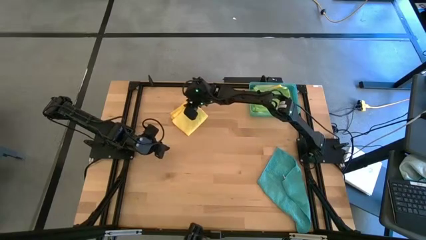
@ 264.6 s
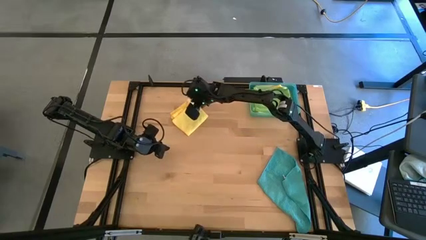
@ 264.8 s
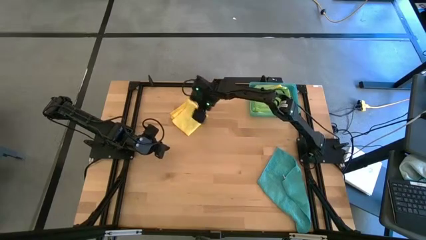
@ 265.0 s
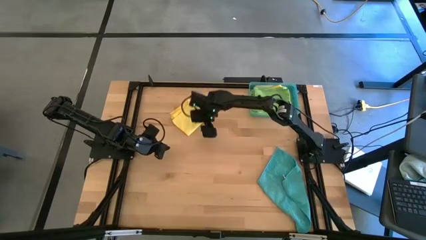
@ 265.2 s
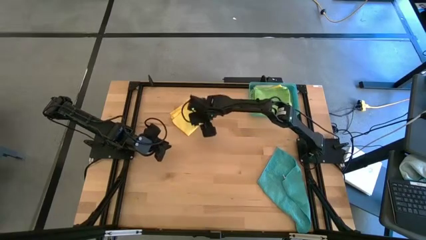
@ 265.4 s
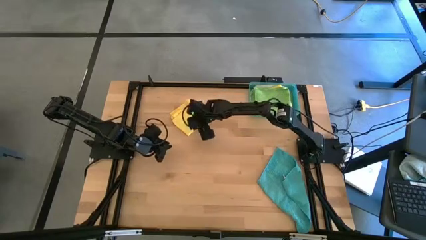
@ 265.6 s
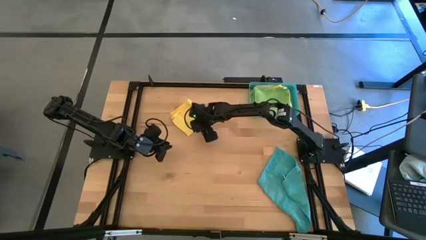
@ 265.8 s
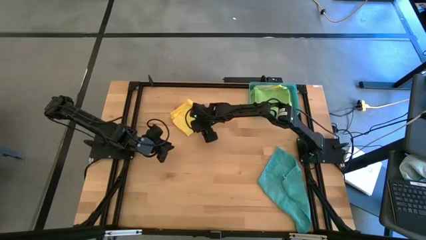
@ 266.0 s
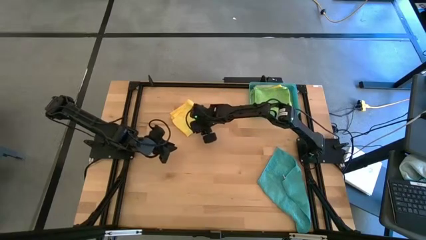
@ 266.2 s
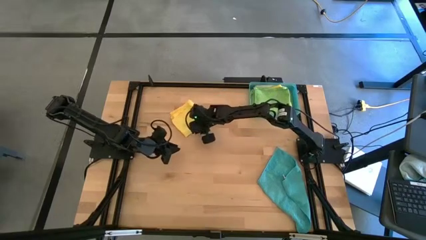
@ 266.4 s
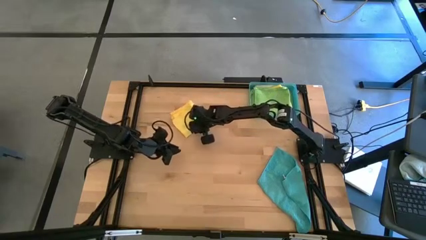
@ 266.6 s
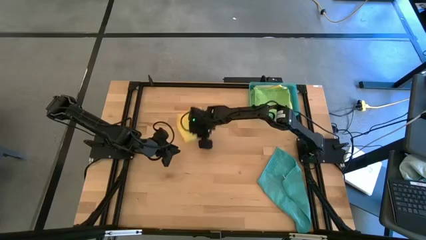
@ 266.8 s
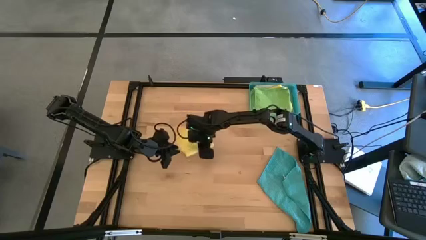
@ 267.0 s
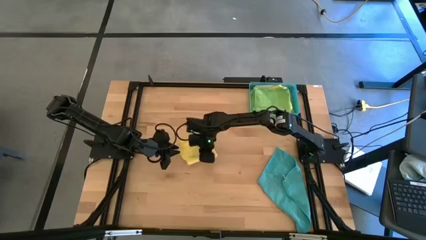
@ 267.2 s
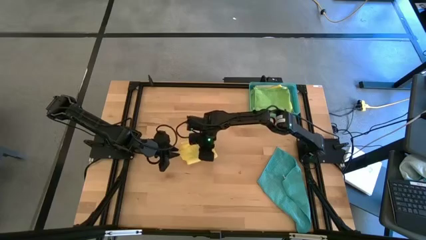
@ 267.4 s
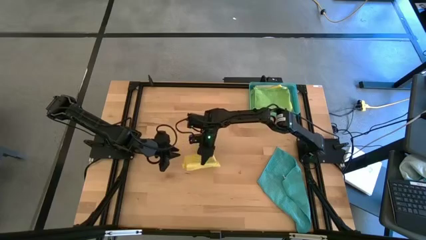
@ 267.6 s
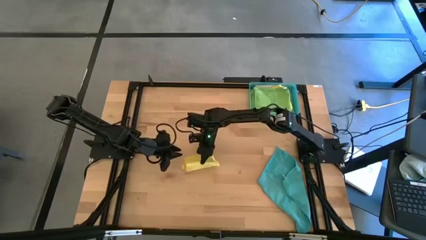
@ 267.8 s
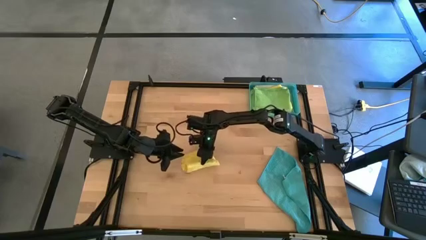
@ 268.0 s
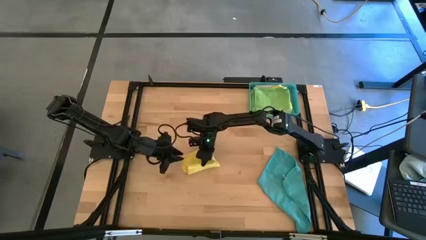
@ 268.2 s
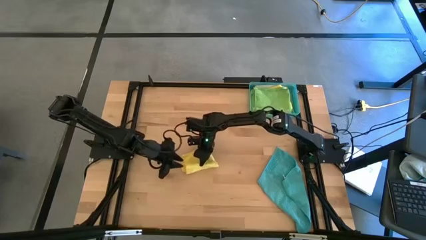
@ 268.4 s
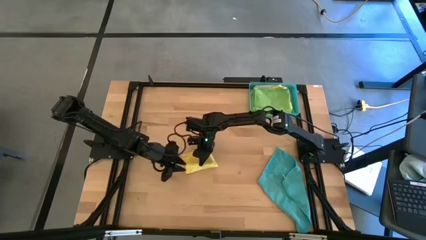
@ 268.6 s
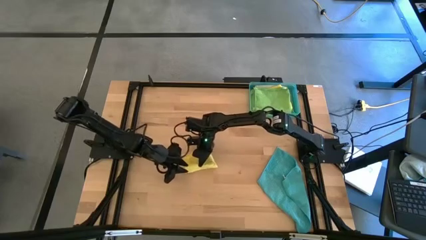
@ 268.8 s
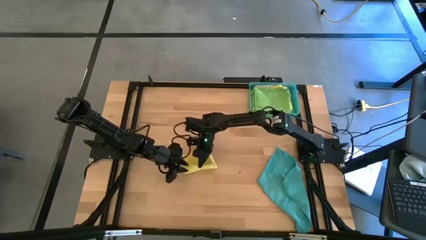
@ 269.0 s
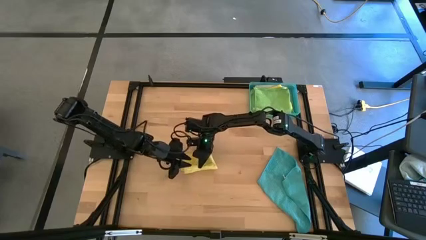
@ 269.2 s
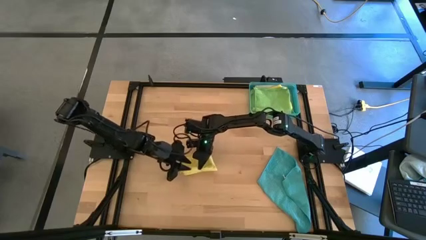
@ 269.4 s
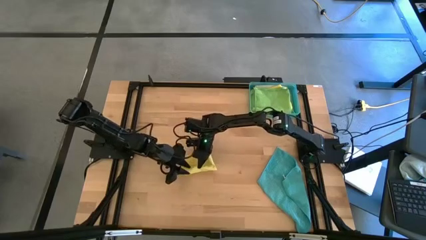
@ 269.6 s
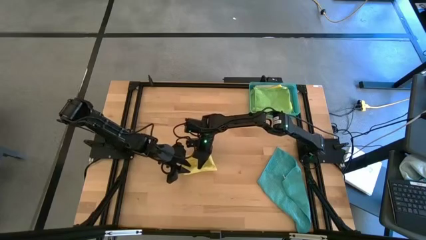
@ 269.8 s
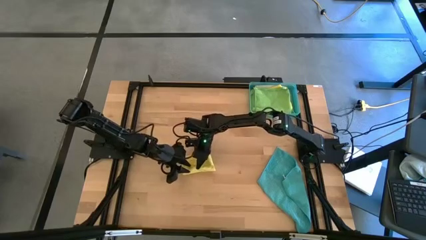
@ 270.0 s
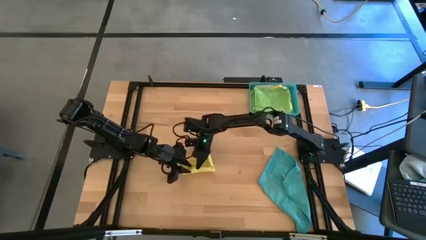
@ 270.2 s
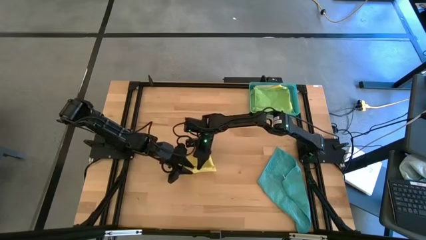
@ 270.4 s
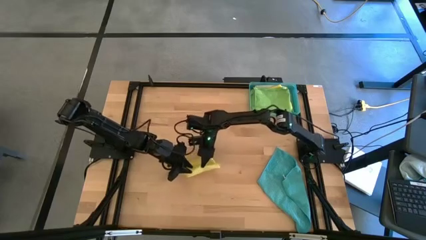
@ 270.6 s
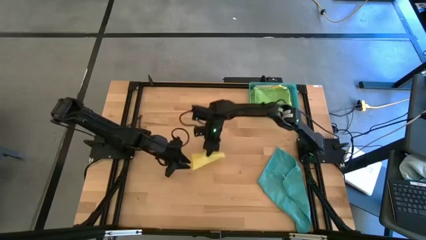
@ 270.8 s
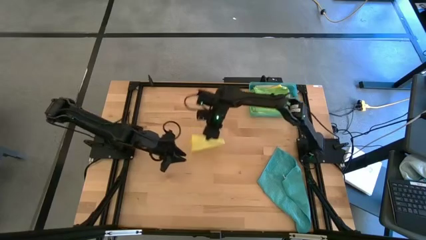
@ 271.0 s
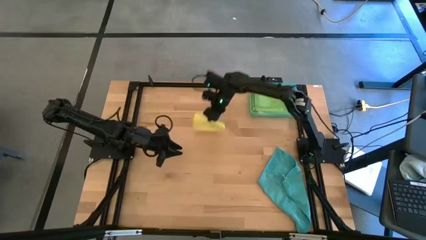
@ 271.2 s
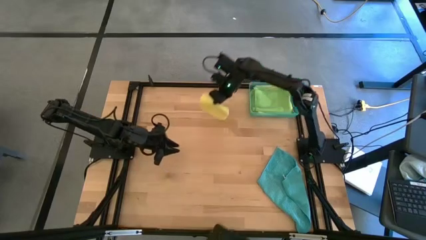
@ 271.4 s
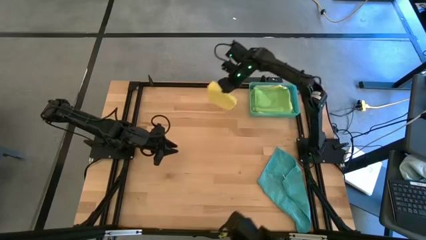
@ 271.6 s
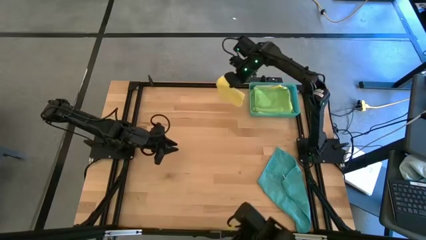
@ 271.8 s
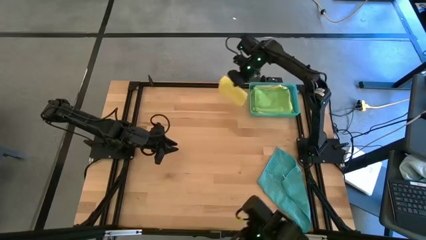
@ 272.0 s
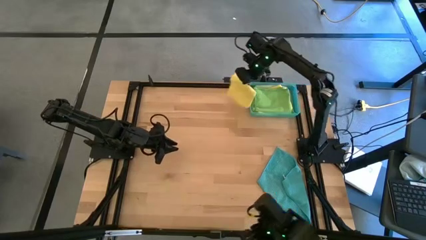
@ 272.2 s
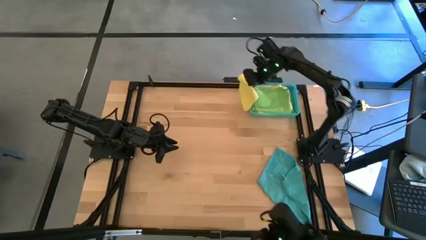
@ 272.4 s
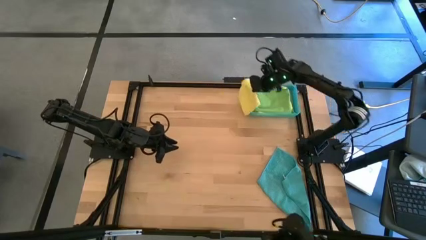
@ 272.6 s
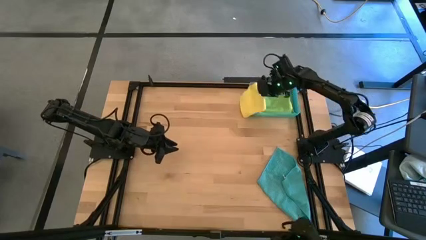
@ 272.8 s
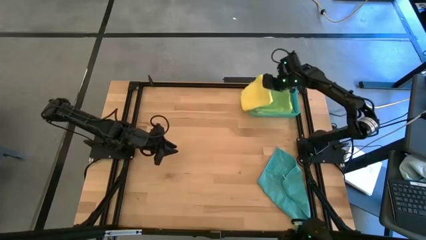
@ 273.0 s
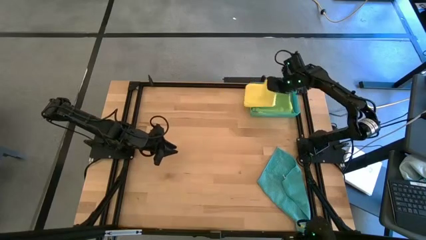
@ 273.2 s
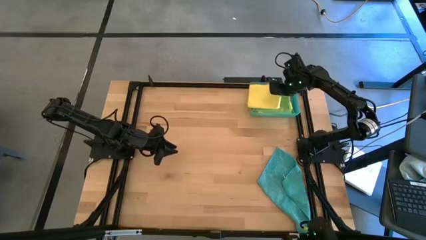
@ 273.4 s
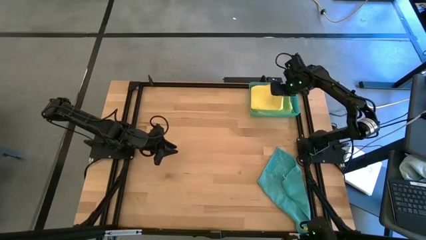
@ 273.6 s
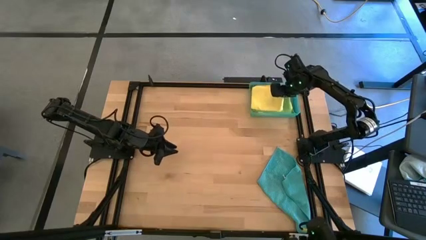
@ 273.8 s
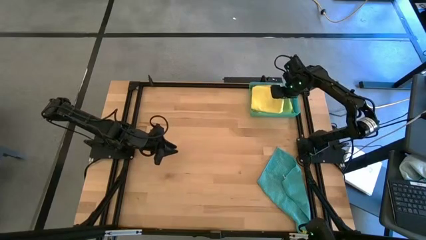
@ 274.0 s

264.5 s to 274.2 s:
Task: Fold microfiber towels
Stack the folded yellow microfiber cloth on top of the folded green microfiber cloth

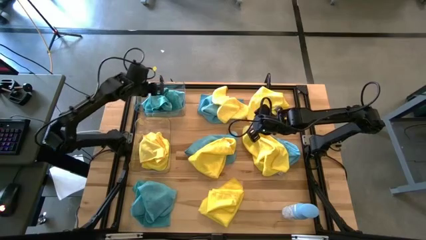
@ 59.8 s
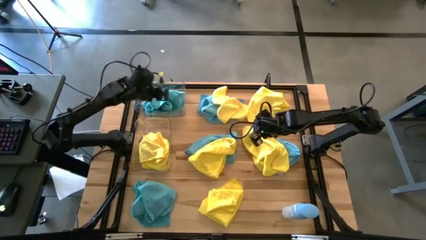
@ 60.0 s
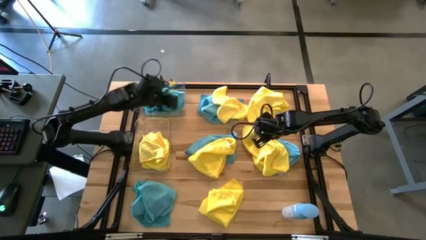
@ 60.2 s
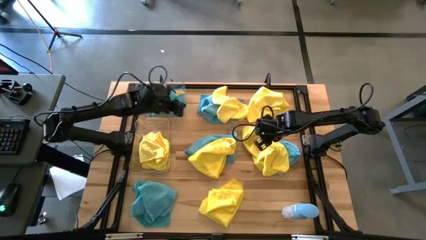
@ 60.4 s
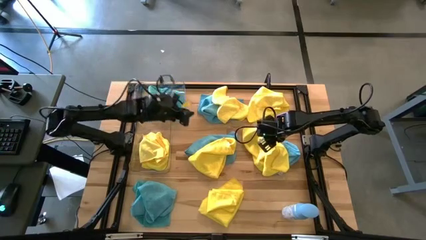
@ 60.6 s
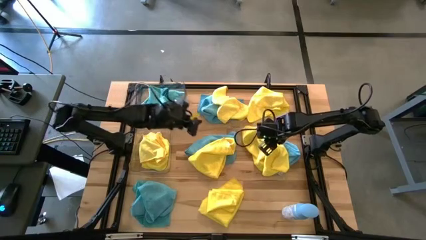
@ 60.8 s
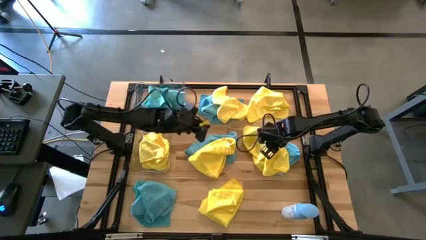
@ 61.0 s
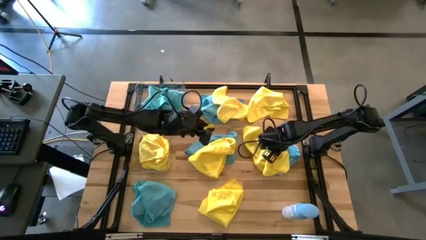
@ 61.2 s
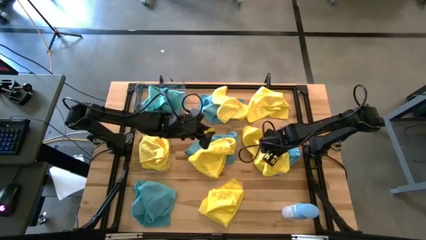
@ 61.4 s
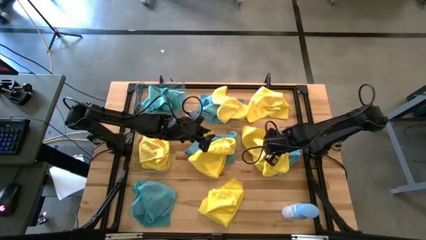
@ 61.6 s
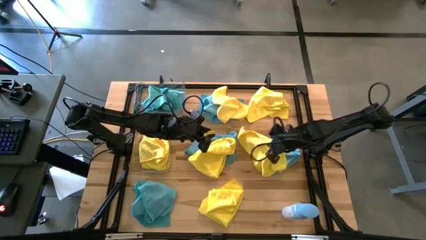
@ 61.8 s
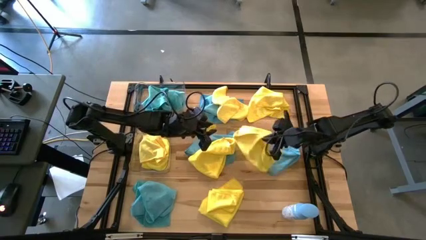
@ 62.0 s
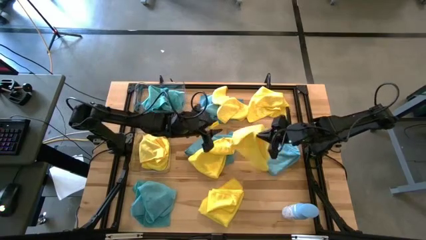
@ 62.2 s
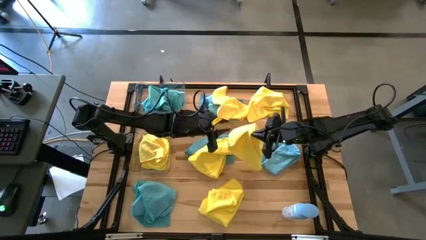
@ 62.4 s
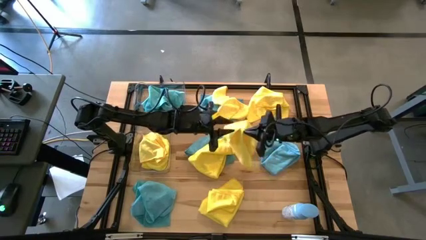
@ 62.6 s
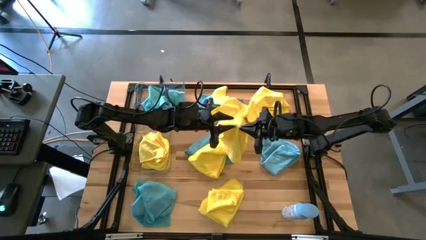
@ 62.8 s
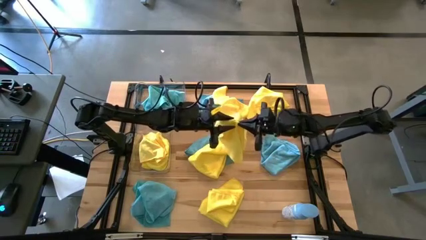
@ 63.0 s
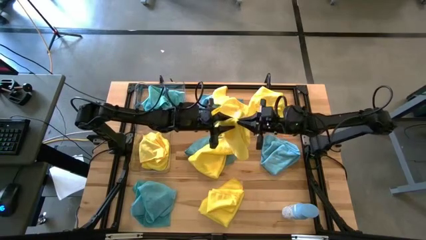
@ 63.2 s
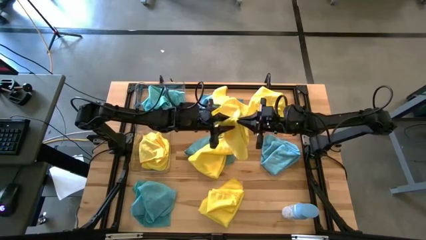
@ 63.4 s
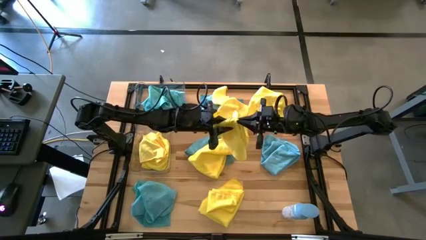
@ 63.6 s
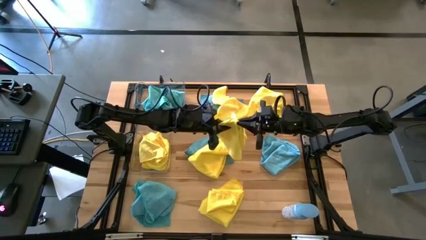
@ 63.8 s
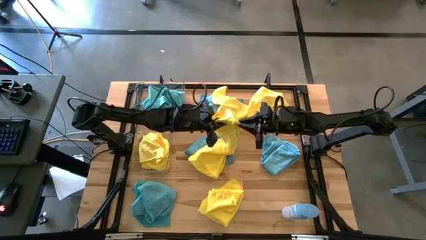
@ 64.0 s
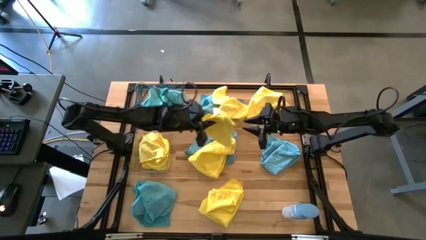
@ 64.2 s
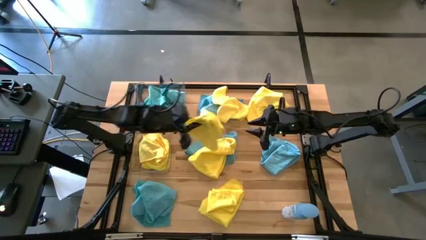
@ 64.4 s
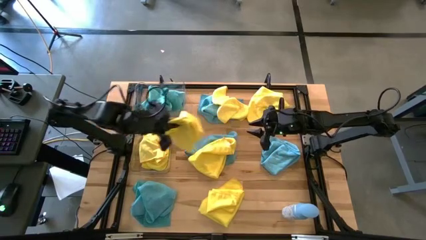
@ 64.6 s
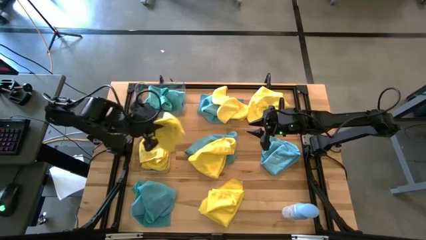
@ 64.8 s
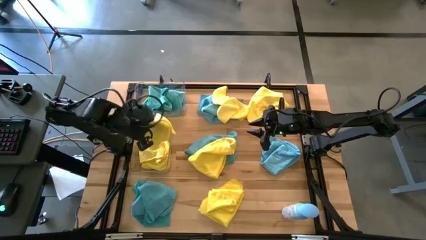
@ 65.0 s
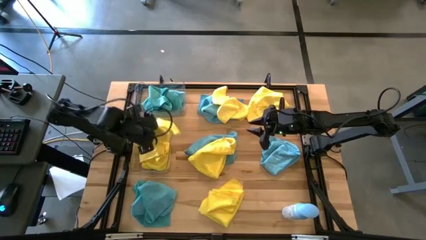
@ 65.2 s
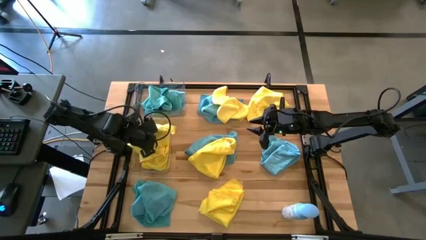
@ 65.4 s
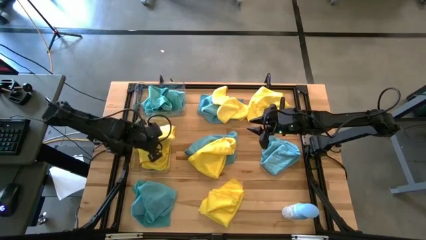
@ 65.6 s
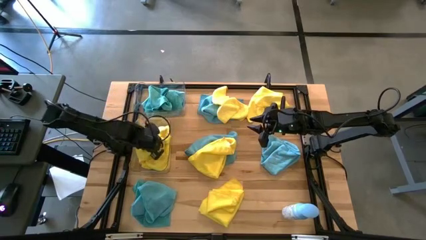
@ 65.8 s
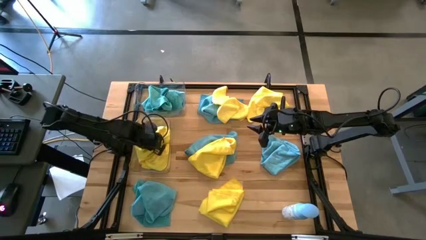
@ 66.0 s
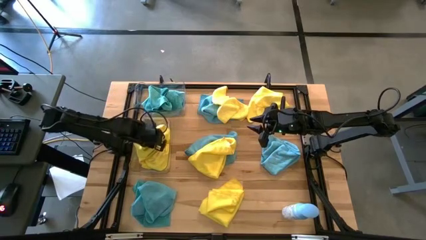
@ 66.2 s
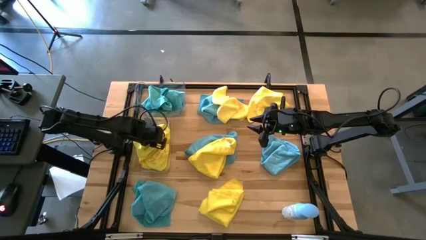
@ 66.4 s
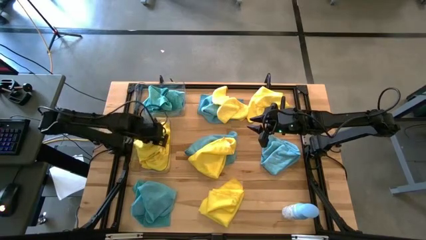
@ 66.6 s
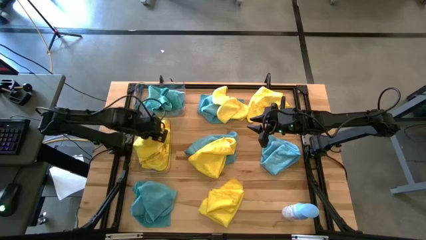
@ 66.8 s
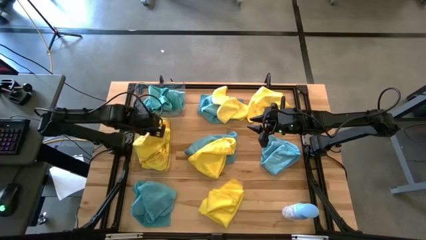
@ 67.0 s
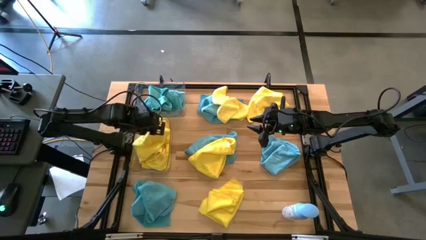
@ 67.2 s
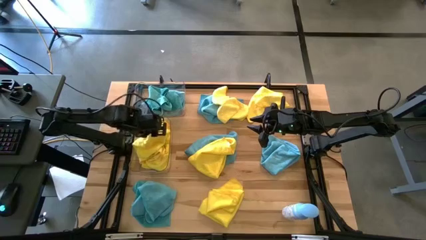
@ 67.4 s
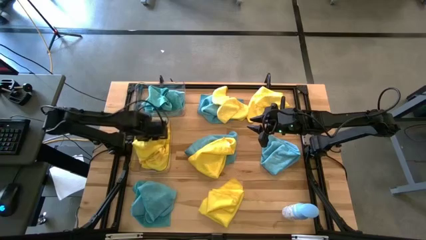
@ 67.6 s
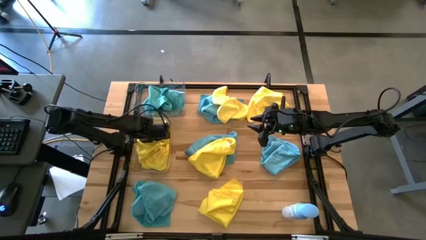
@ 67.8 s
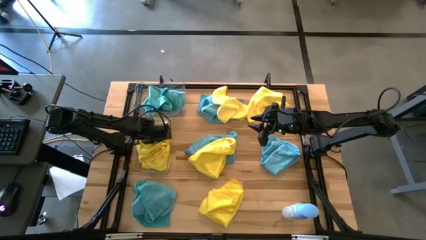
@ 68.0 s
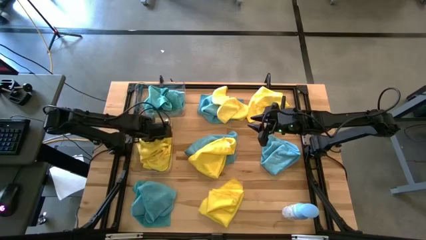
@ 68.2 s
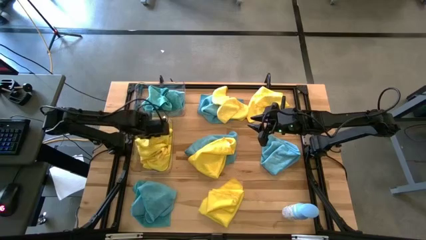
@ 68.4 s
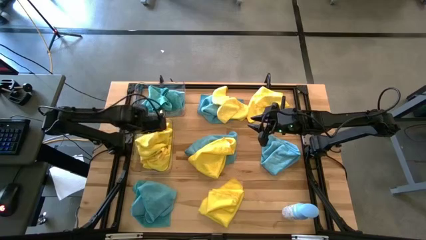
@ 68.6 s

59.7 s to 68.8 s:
Task: Sort microfiber towel by color & place in baskets
Put the yellow microfiber cloth into the bottom transparent bin
